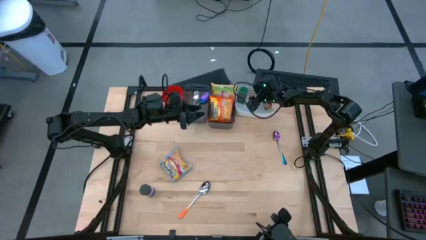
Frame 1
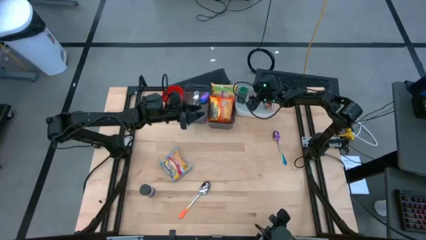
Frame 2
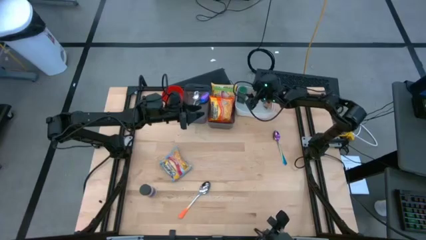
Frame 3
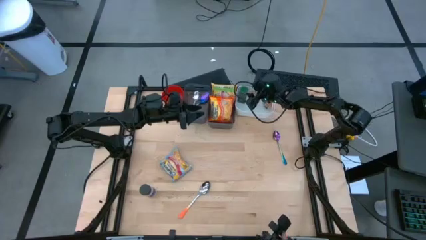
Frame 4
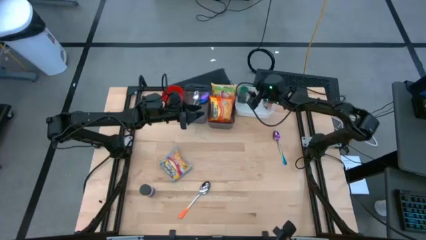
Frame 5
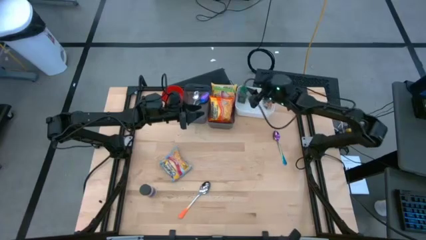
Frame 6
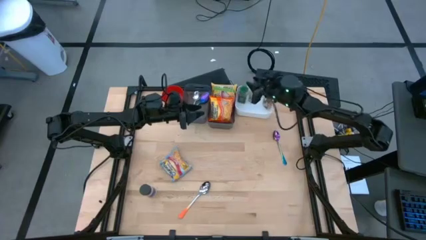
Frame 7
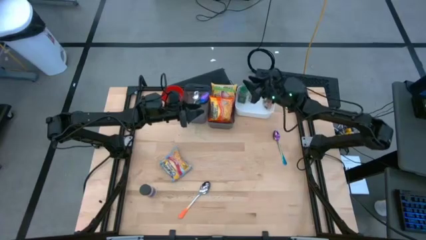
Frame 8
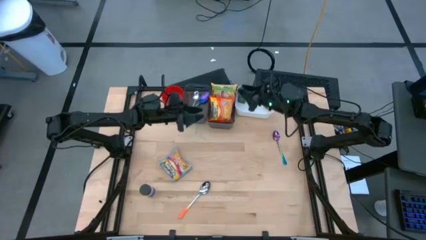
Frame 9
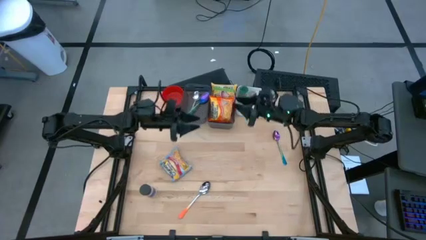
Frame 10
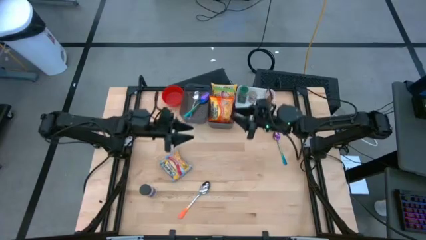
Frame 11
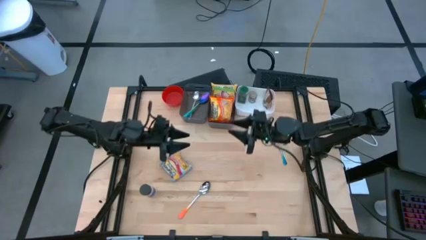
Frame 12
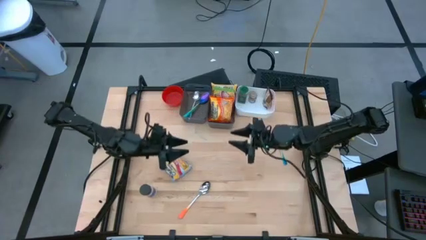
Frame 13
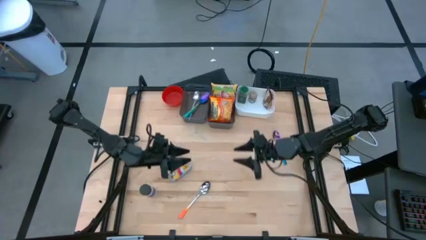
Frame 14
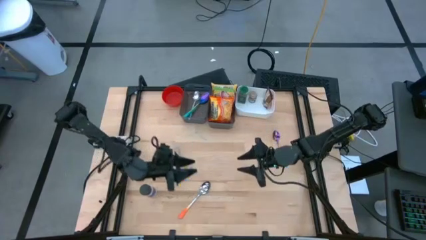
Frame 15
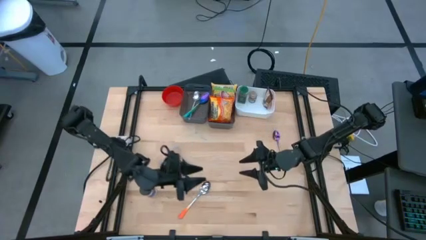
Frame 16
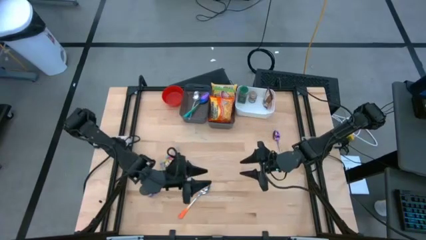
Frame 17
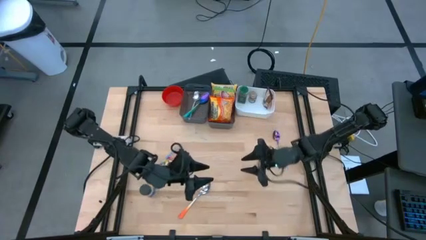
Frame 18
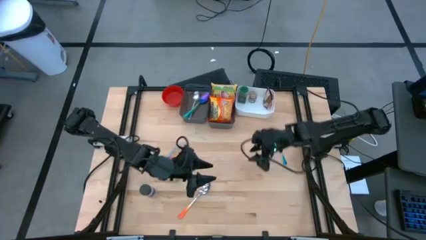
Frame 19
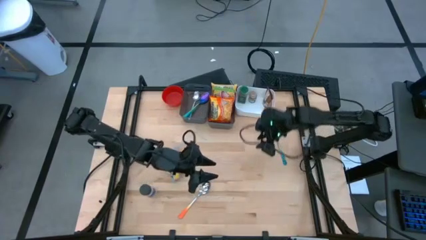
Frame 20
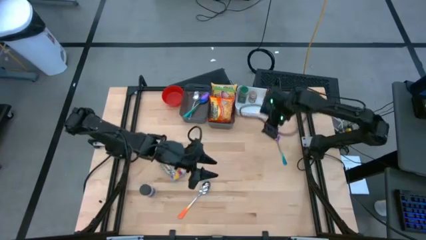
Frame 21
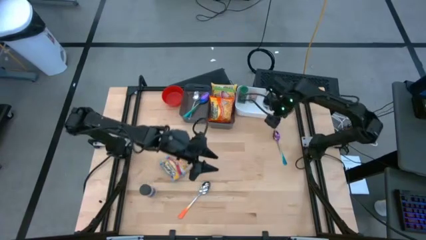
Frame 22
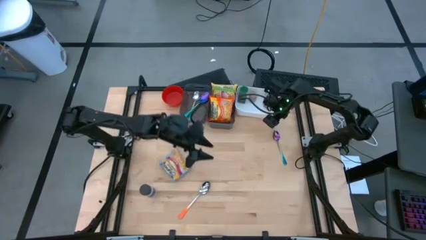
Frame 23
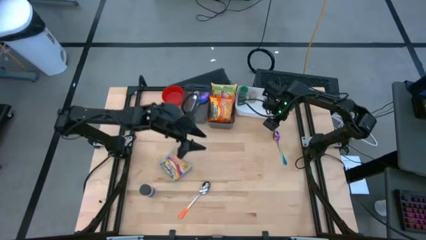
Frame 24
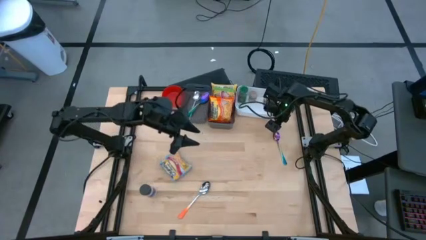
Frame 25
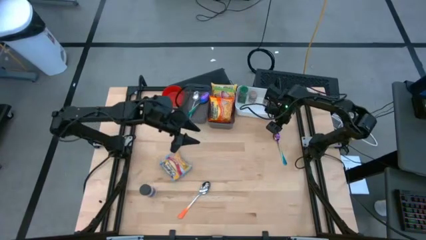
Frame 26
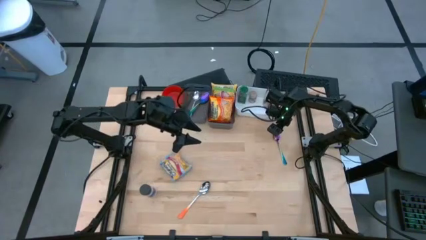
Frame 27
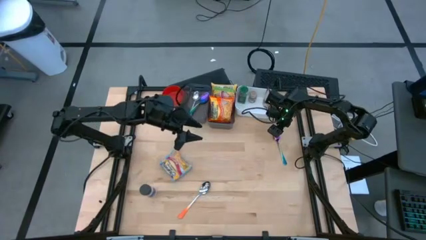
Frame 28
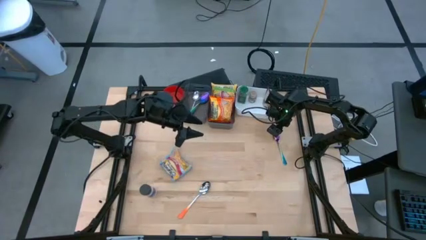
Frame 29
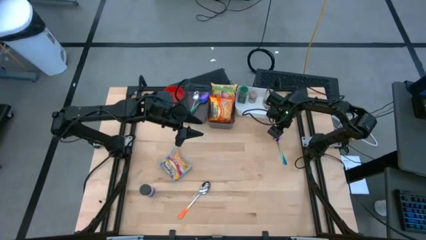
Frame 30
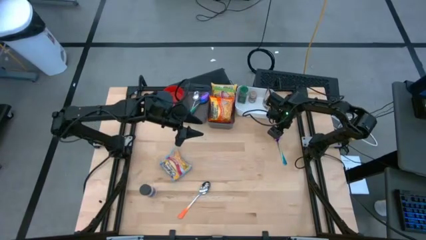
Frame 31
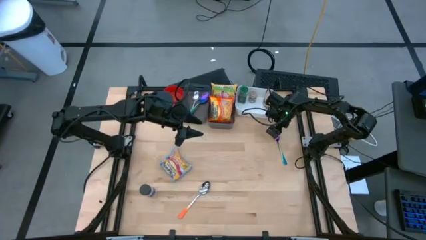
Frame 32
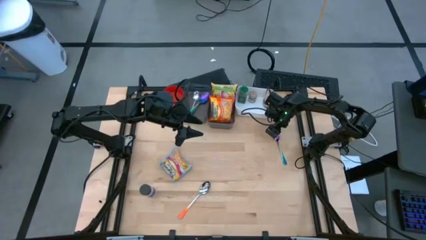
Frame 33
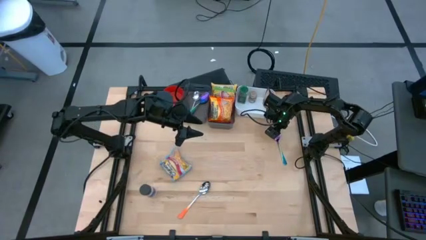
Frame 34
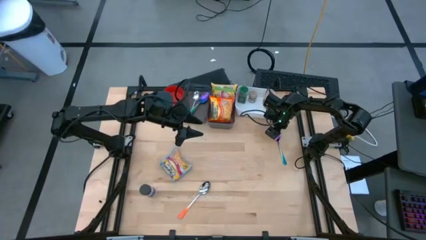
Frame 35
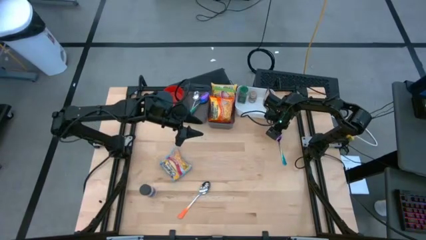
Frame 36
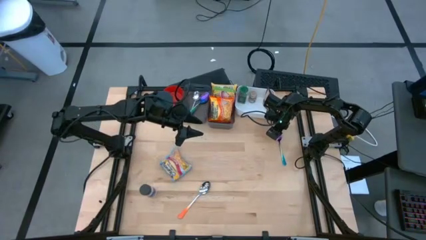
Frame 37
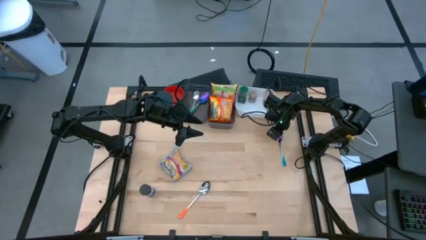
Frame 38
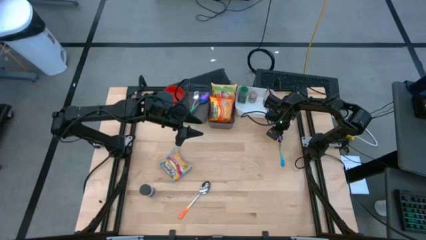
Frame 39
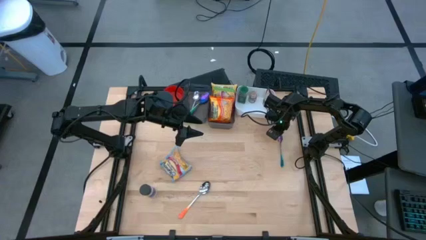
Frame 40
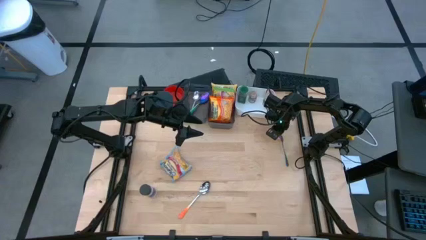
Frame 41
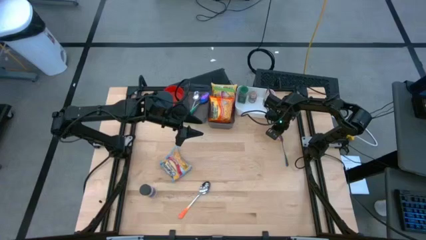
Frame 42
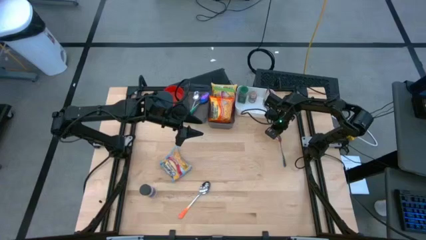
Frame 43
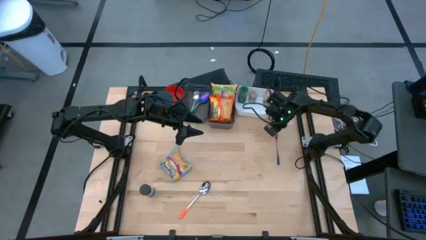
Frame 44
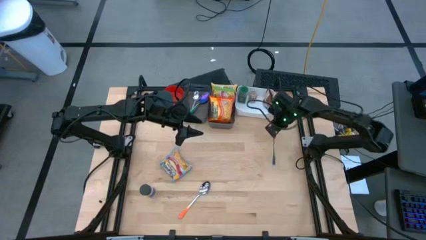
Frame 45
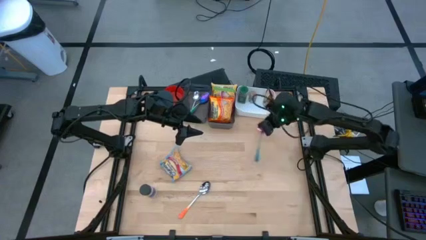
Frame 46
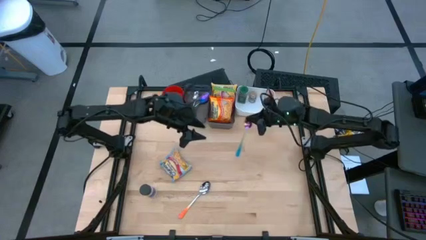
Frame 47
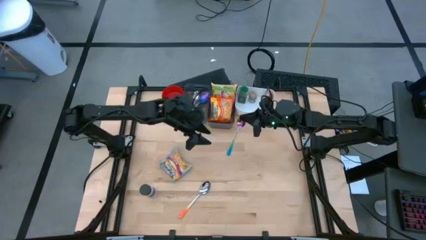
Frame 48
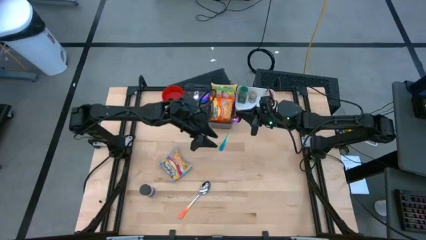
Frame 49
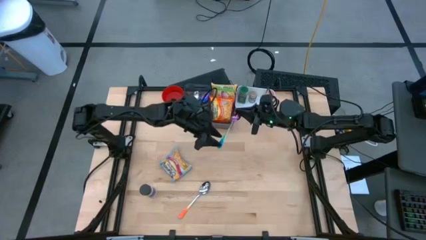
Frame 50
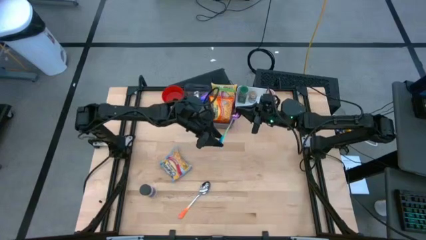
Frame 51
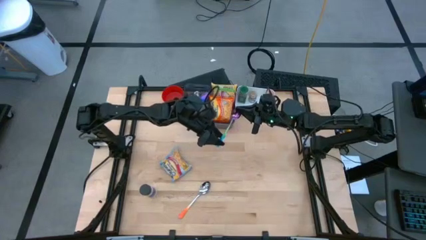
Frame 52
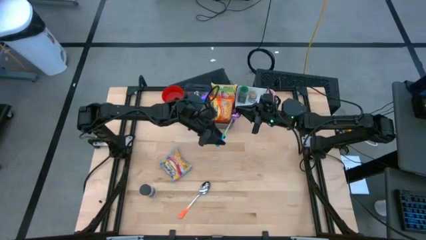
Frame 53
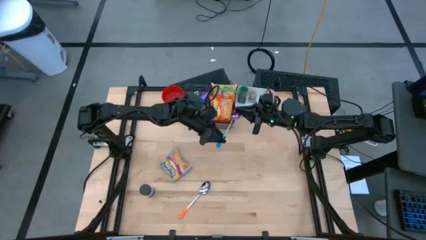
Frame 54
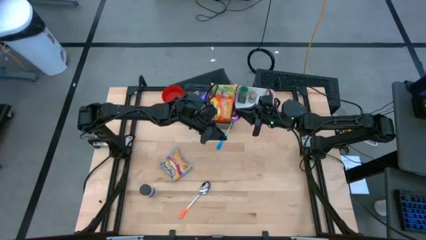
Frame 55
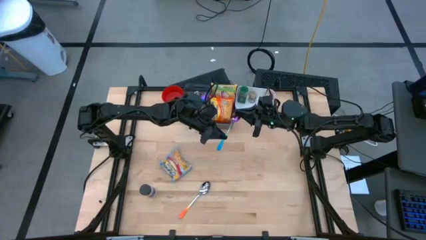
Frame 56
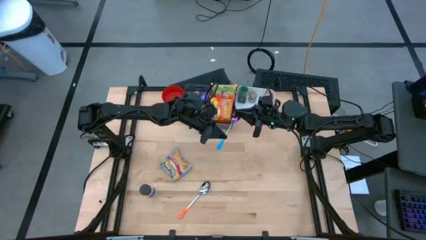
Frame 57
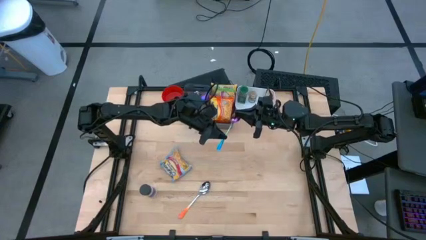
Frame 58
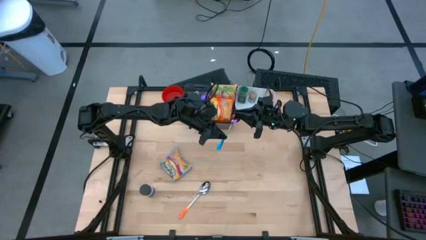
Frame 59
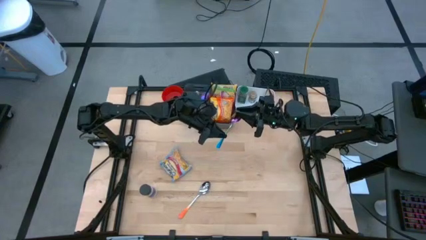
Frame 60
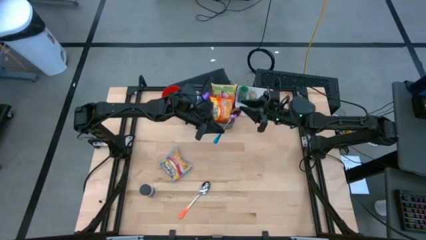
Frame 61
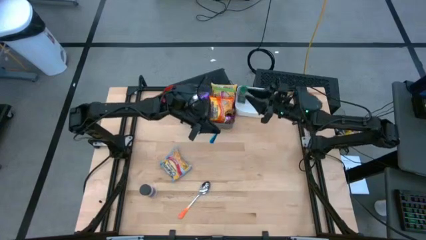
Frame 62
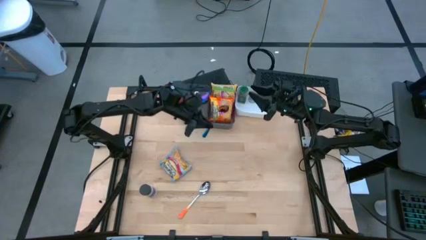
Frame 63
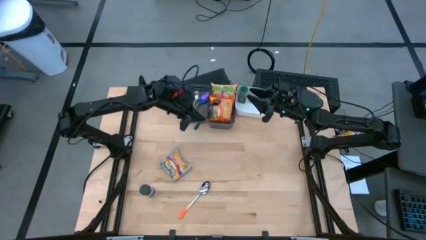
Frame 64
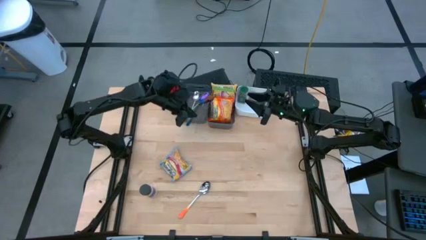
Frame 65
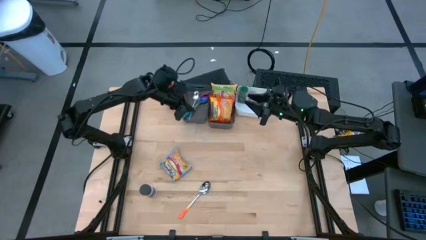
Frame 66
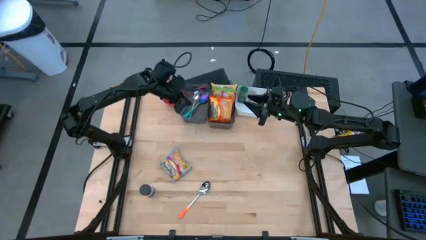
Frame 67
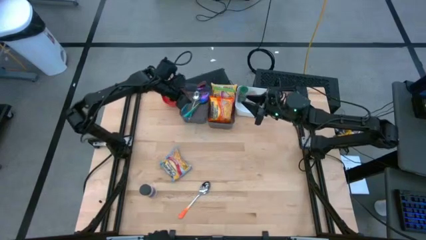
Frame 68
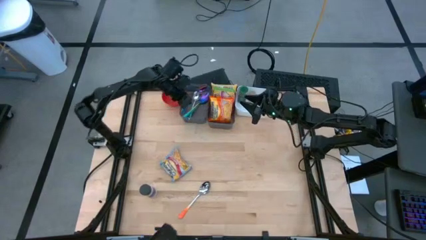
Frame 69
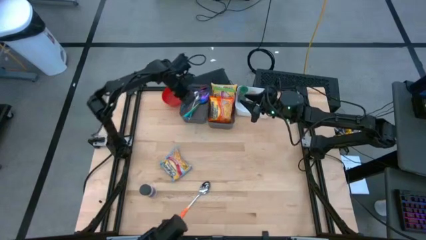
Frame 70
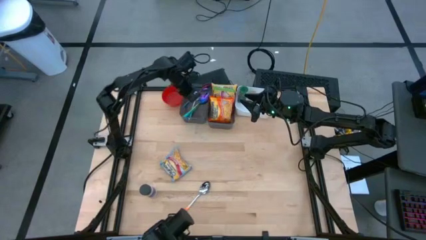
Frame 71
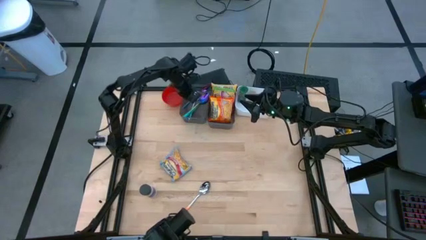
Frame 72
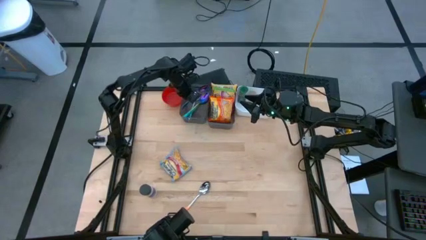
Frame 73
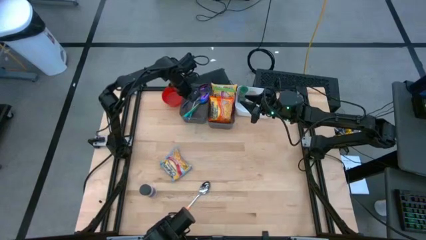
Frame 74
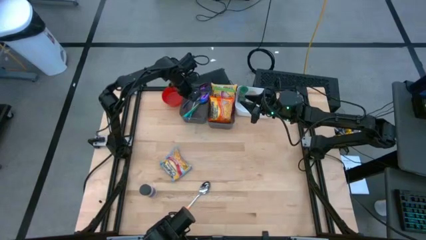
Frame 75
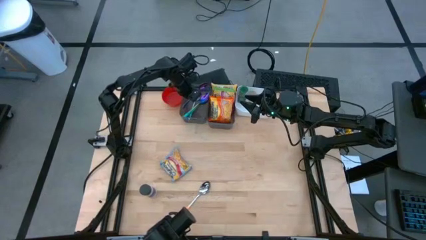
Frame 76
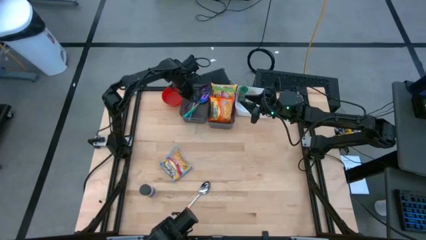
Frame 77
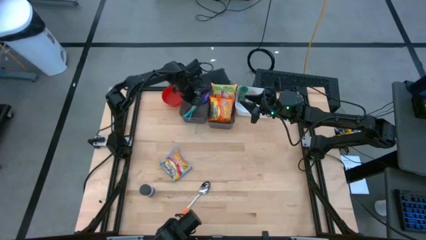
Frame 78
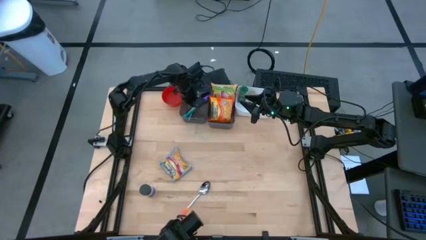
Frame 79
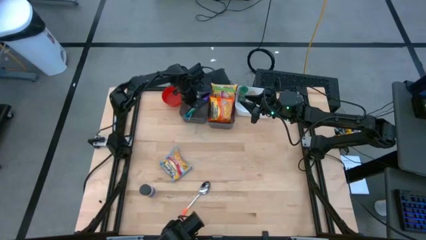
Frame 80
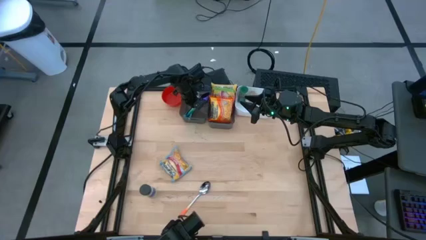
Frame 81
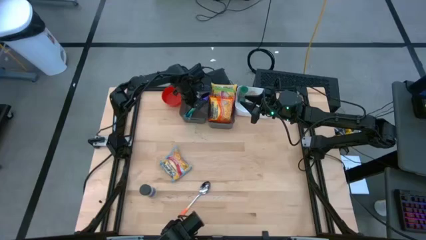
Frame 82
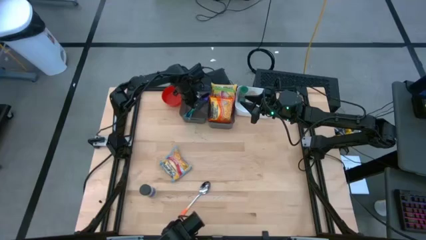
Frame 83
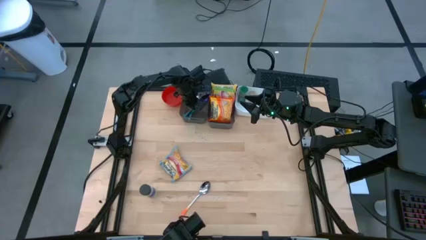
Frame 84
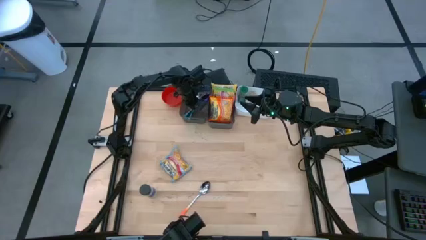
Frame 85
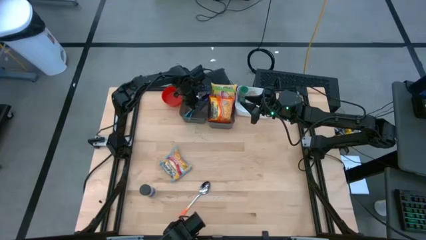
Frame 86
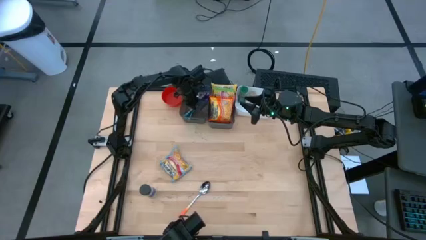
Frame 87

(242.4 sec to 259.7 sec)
Task: Pick & Place Food Item
Put the purple and blue spoon into the left black bin
